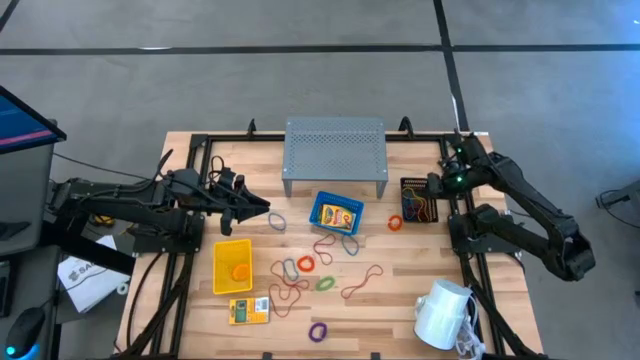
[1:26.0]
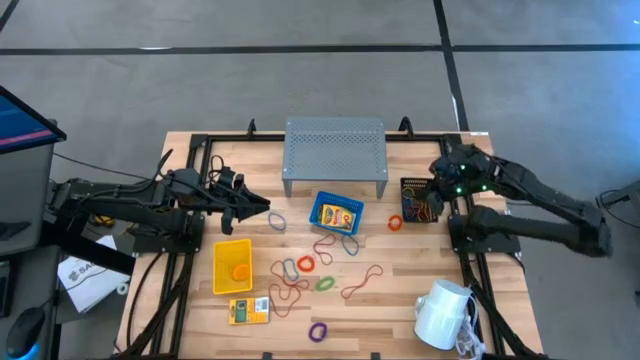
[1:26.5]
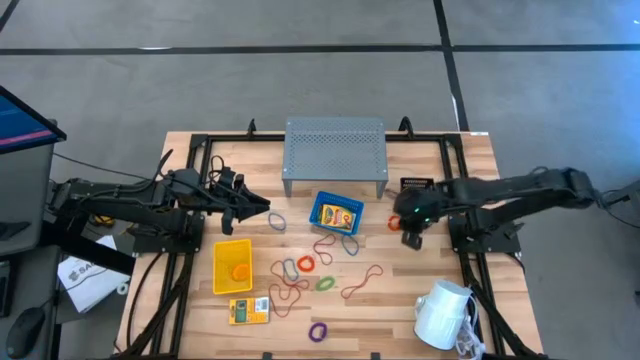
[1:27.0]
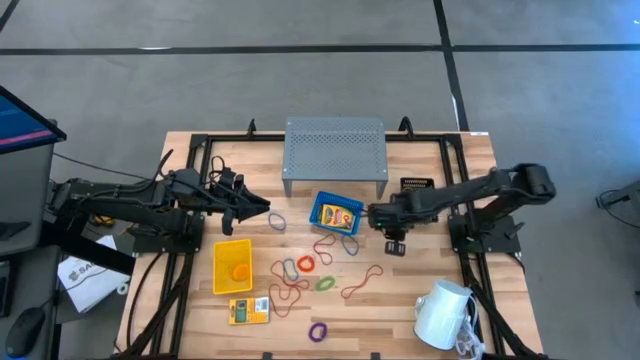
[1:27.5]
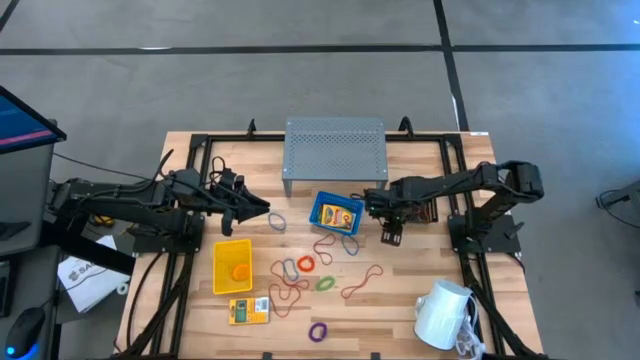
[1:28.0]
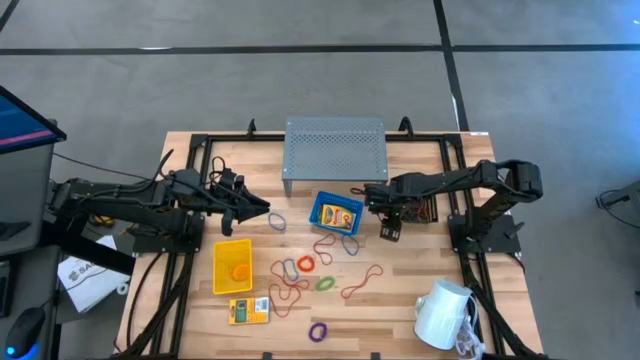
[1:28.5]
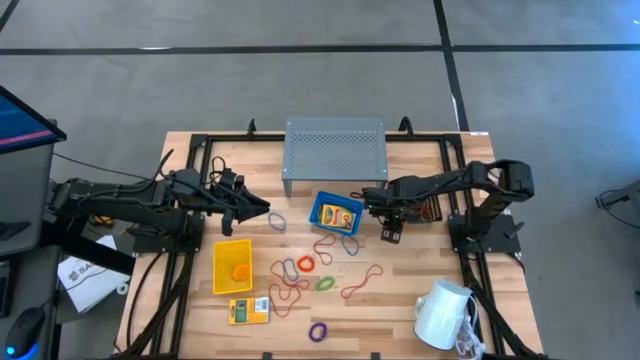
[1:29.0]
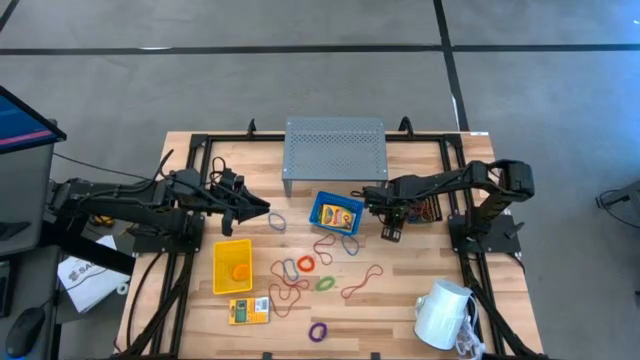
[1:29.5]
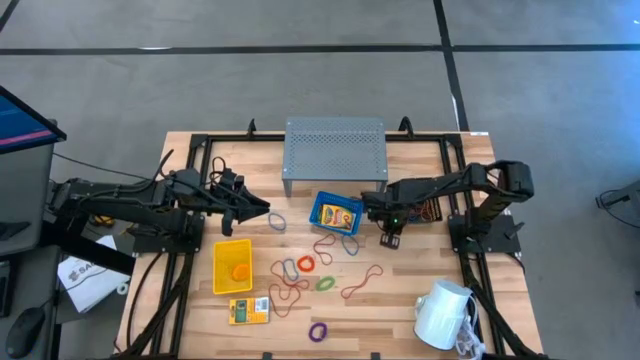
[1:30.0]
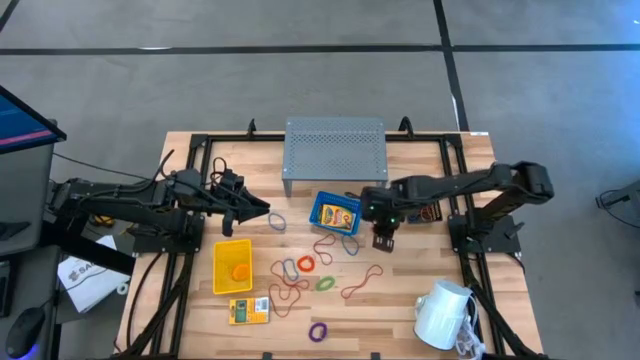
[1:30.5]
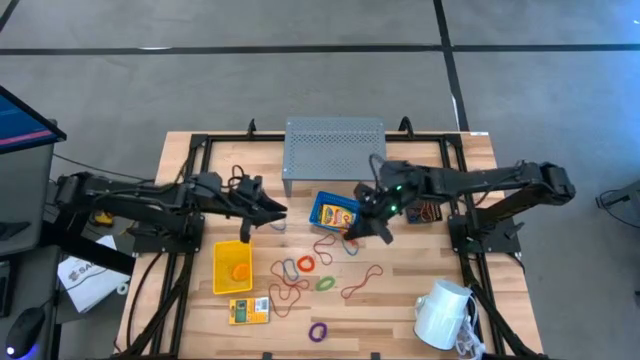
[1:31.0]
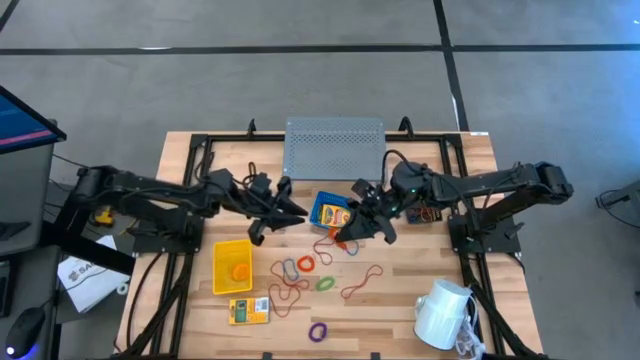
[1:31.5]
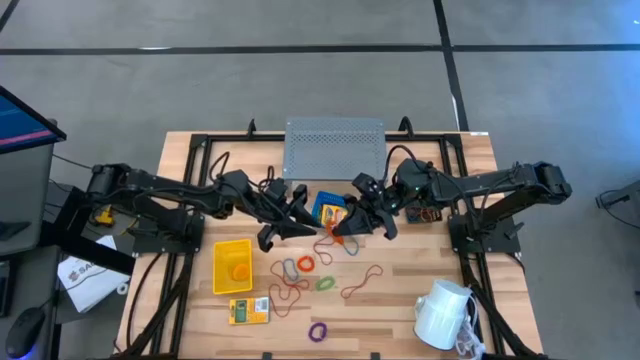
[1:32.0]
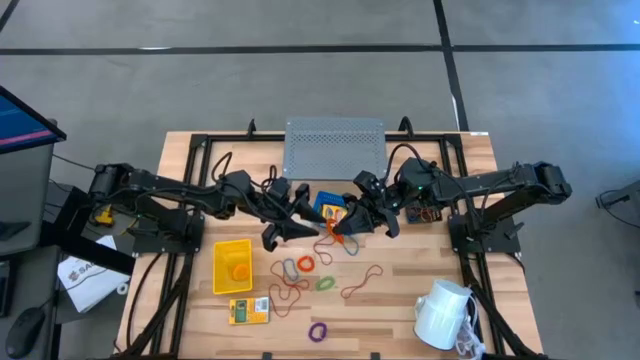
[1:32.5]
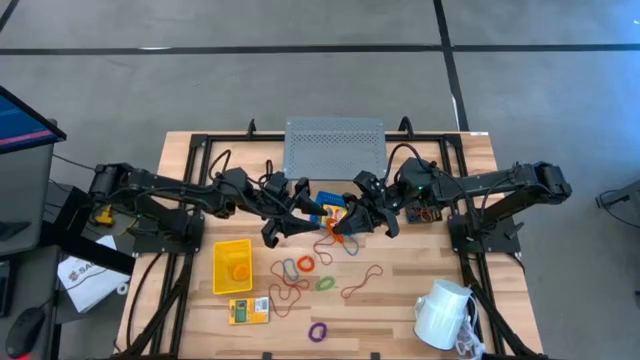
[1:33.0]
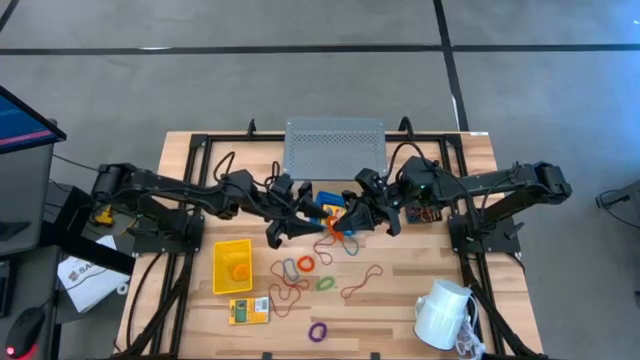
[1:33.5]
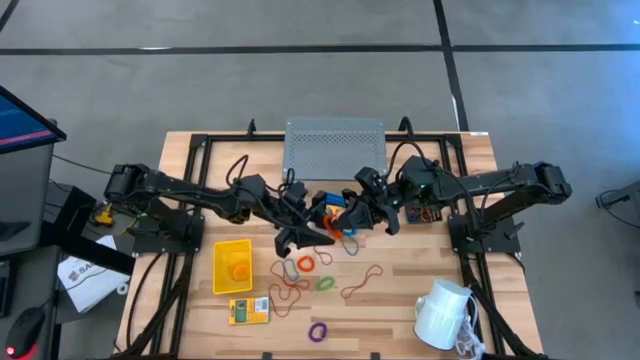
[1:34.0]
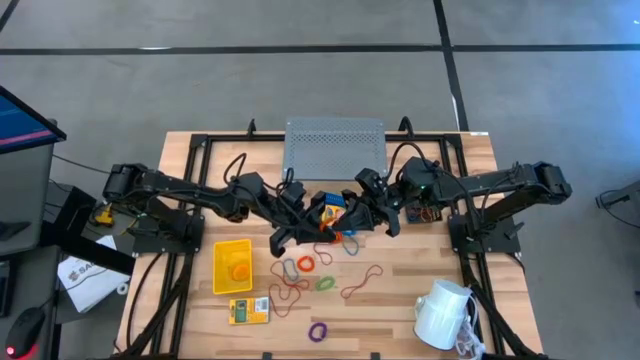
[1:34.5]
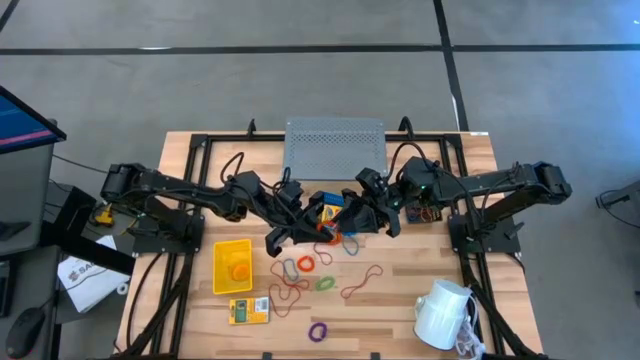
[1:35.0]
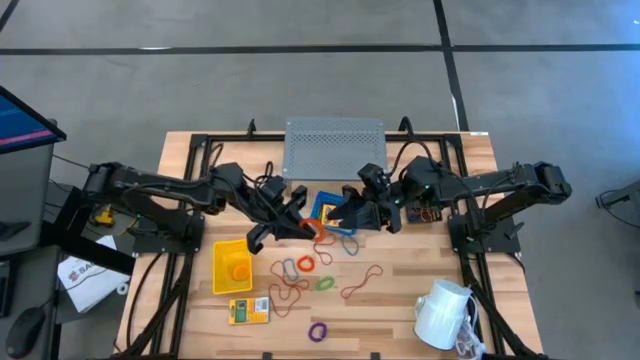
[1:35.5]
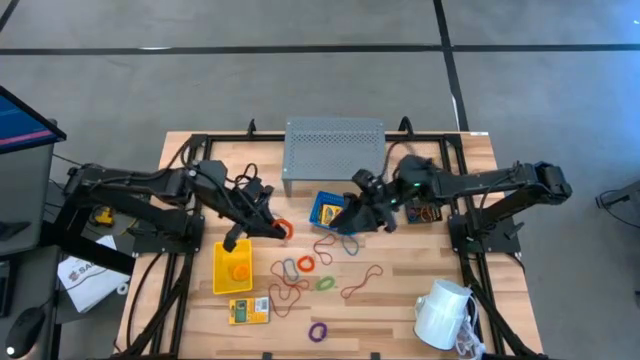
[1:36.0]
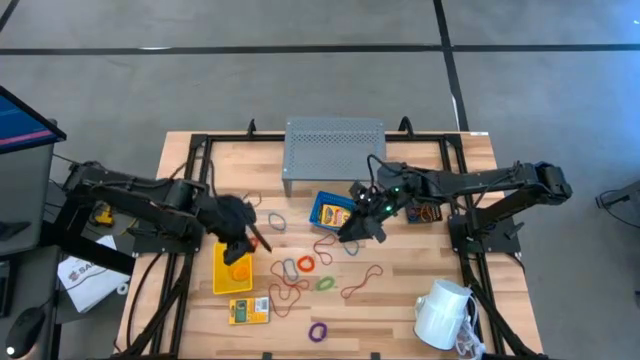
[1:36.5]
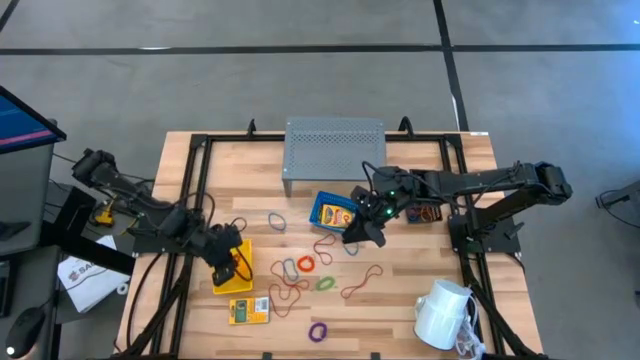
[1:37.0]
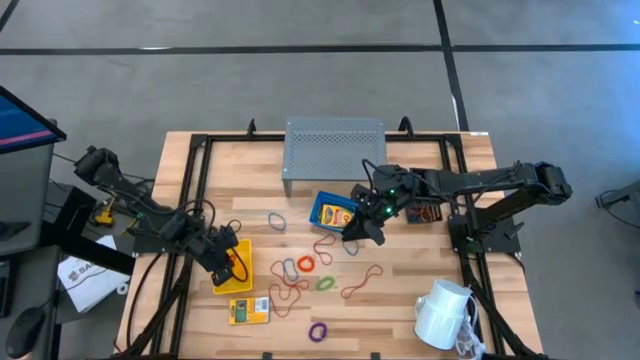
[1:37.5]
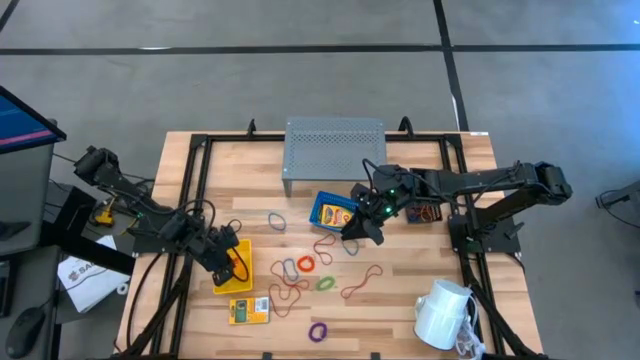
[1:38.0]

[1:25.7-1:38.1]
Task: Pick & Place Office Desk Supplies
Put the orange spring keychain into the yellow bin

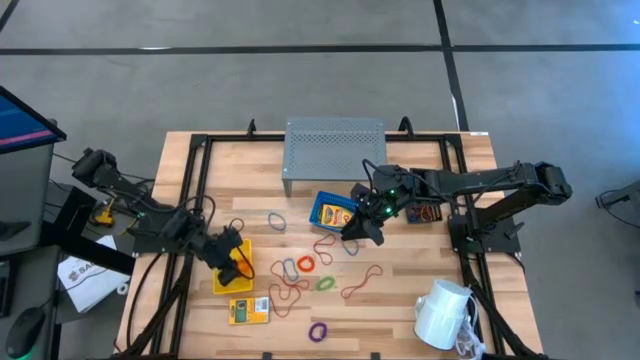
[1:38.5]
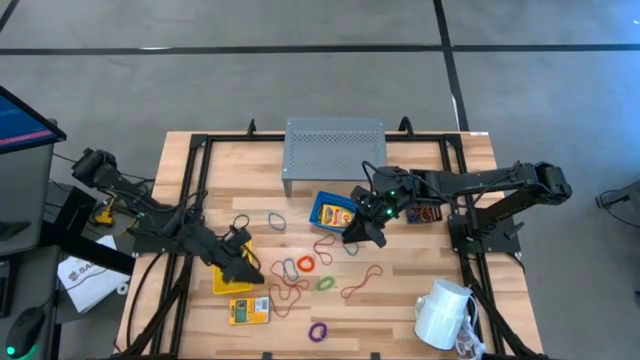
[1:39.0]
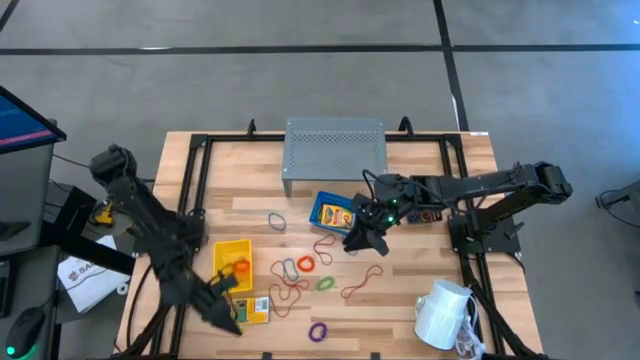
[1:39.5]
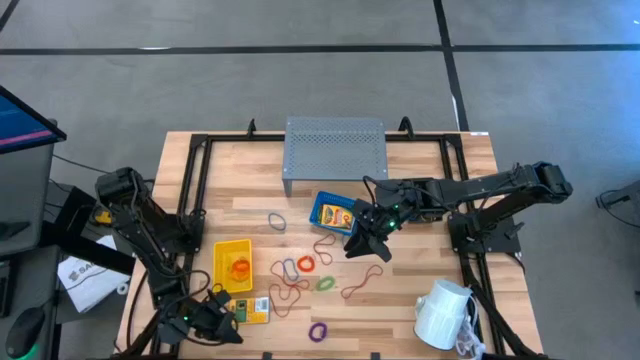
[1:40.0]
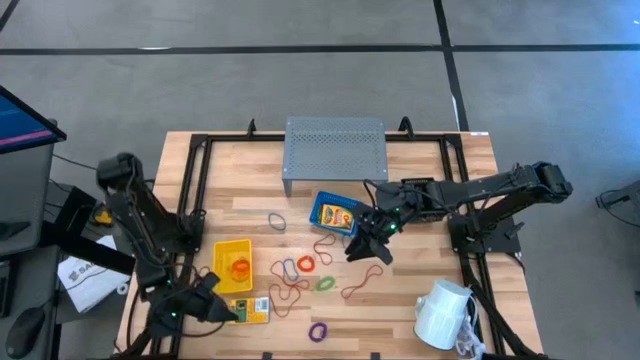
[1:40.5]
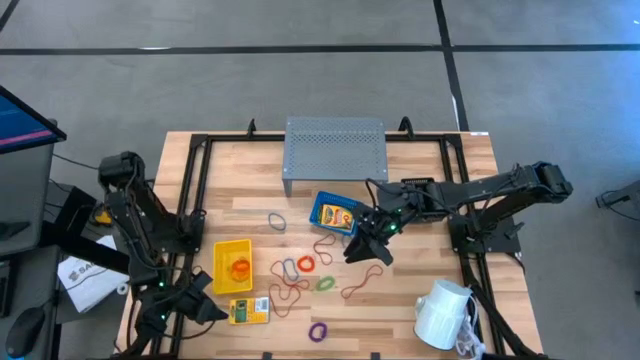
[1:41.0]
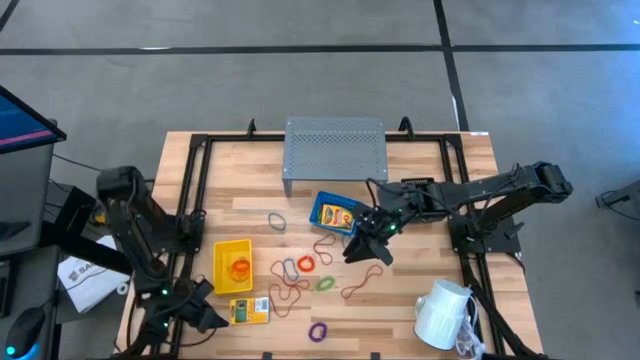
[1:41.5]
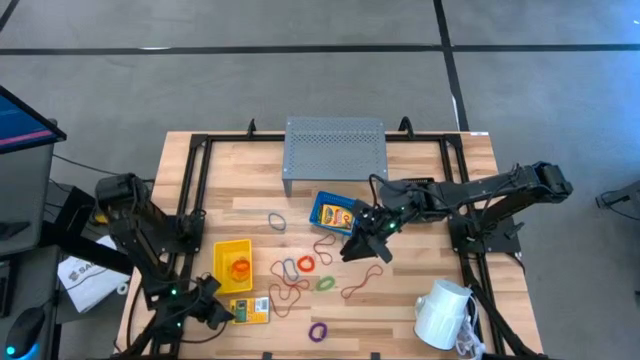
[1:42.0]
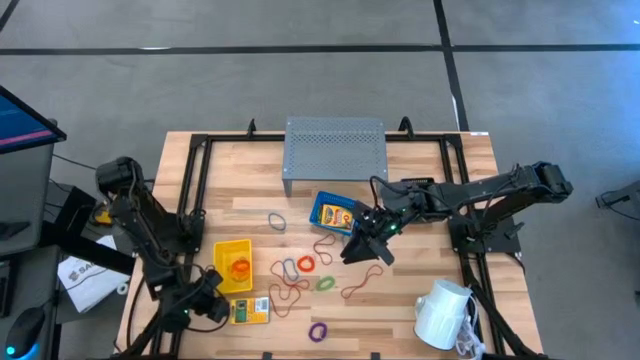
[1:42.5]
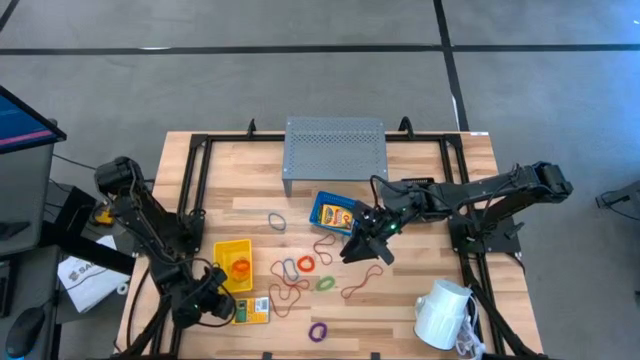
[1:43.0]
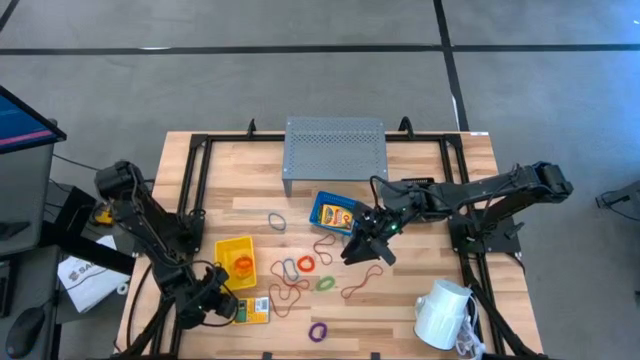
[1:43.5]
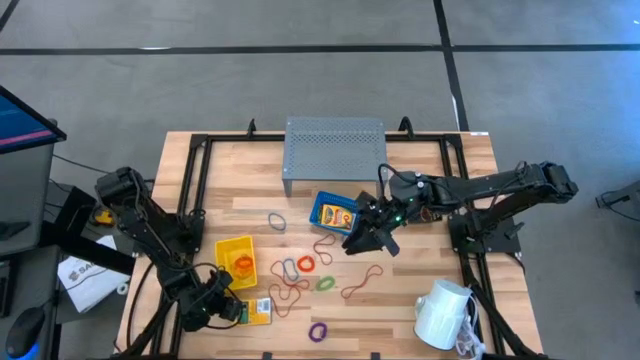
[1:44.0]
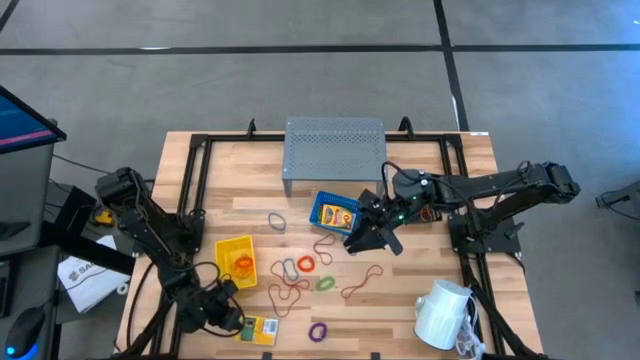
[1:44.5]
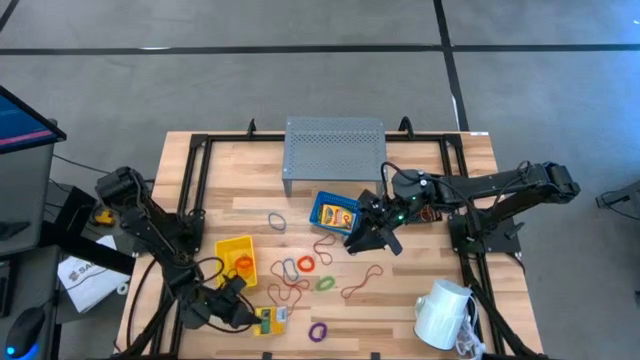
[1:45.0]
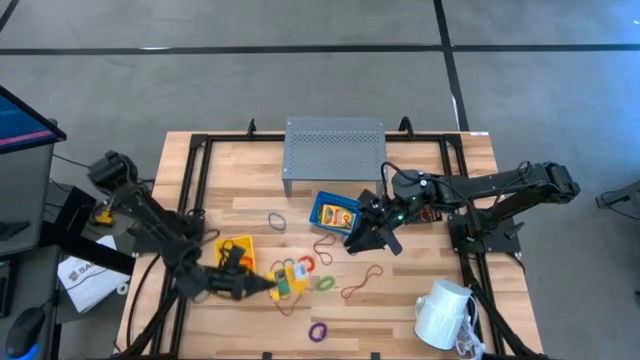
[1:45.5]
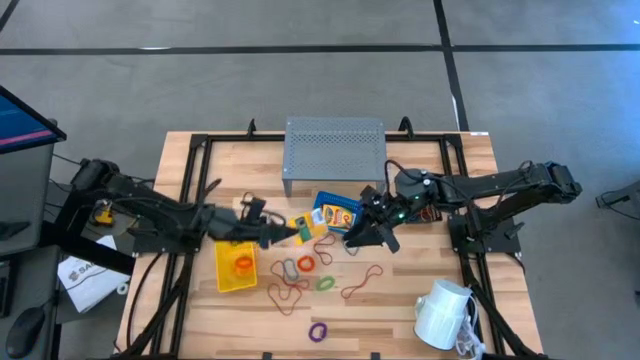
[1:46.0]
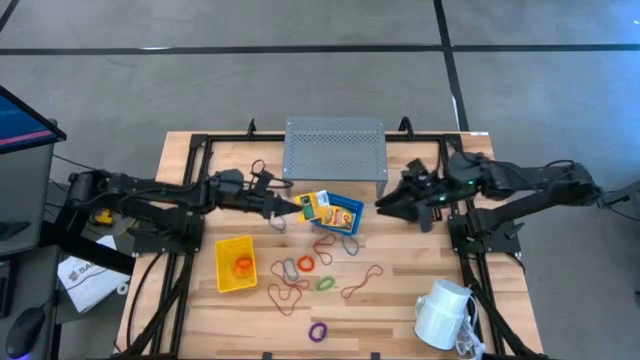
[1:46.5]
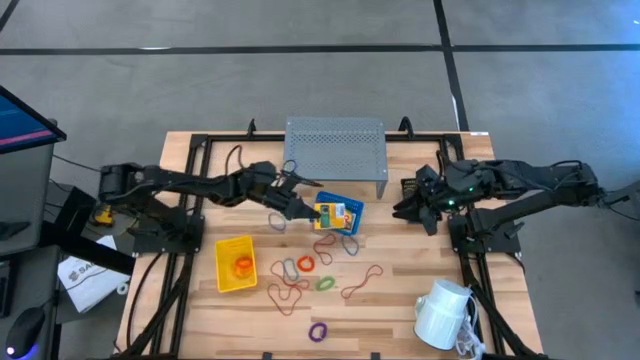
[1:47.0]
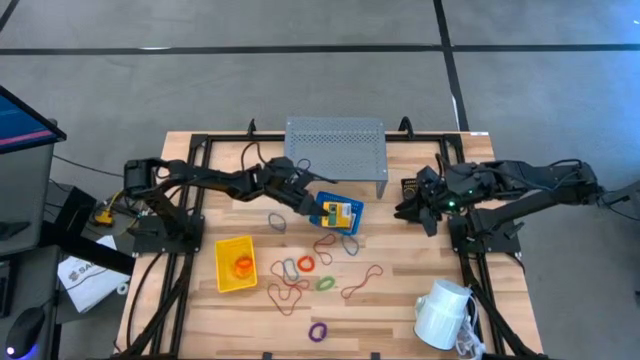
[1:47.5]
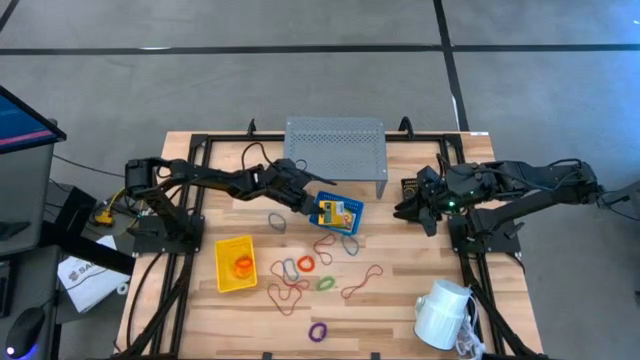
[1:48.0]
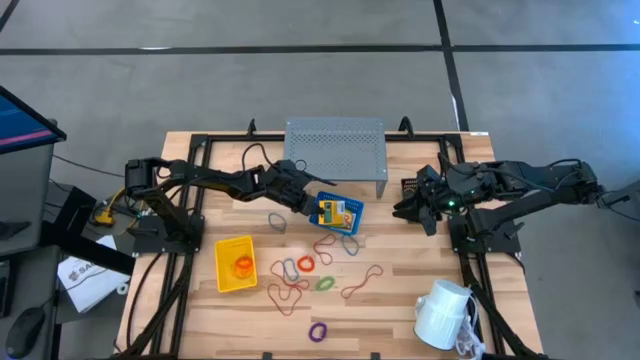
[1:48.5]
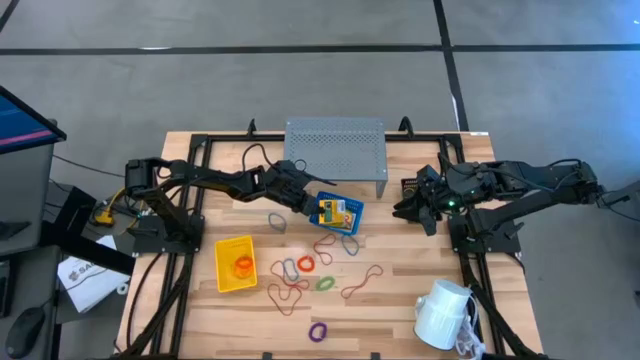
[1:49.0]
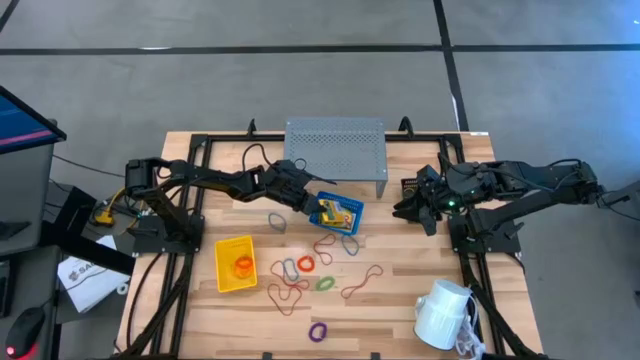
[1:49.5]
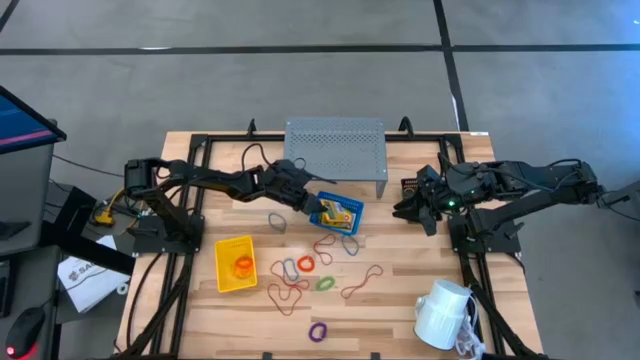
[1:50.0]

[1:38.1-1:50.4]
Put the yellow crayon box into the blue bin
